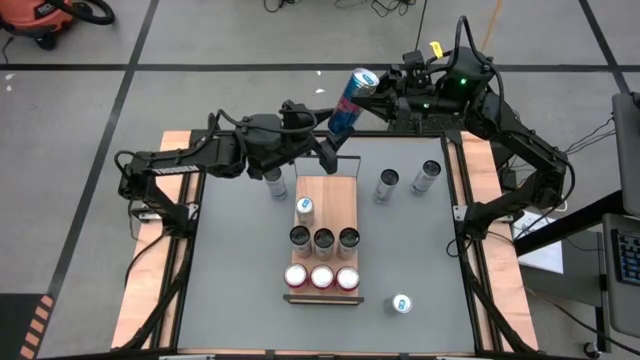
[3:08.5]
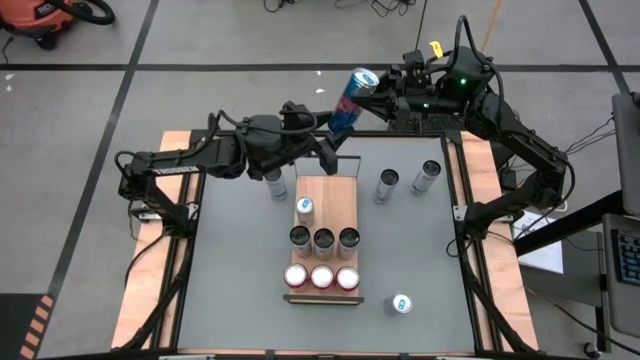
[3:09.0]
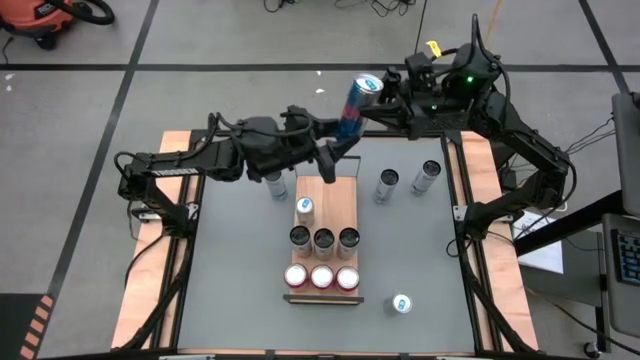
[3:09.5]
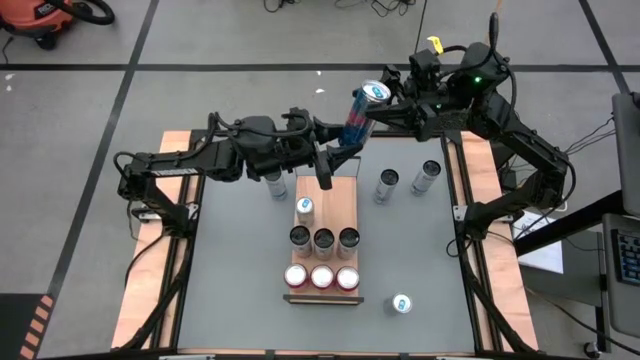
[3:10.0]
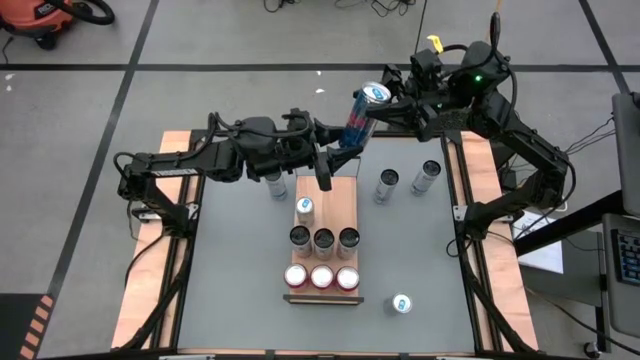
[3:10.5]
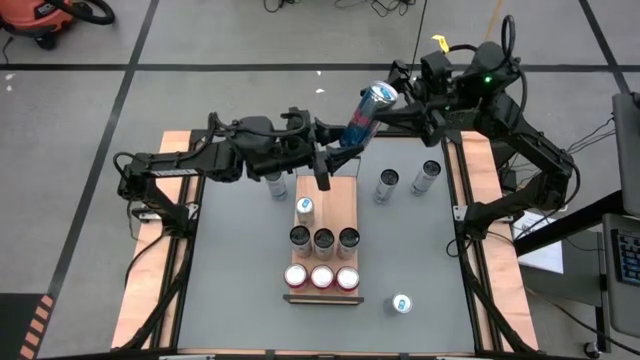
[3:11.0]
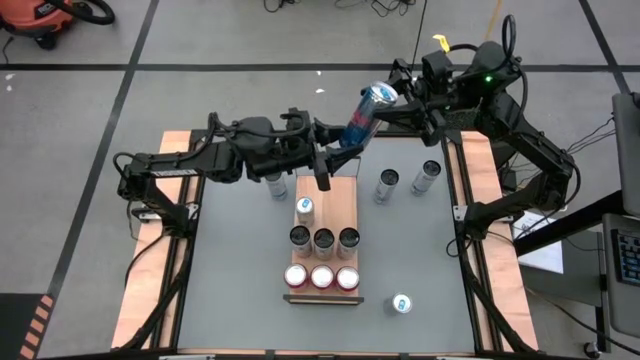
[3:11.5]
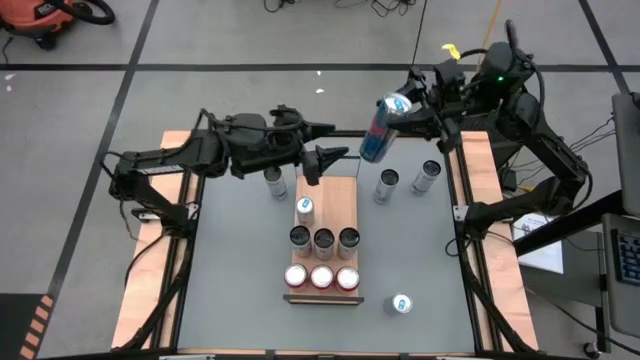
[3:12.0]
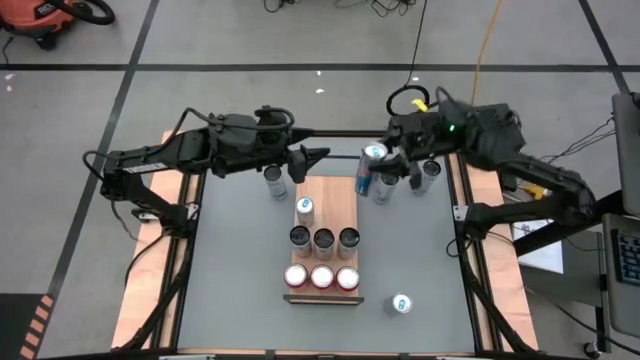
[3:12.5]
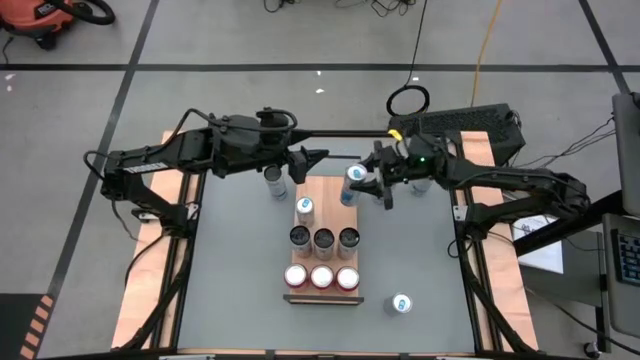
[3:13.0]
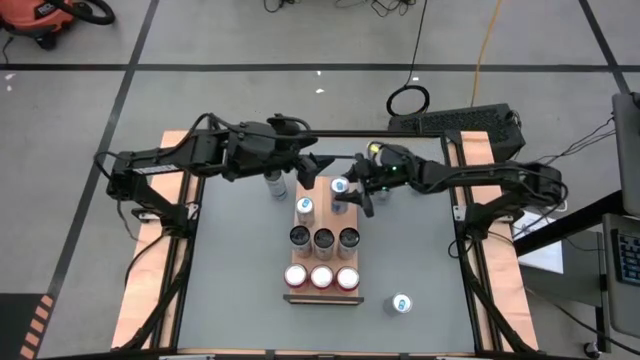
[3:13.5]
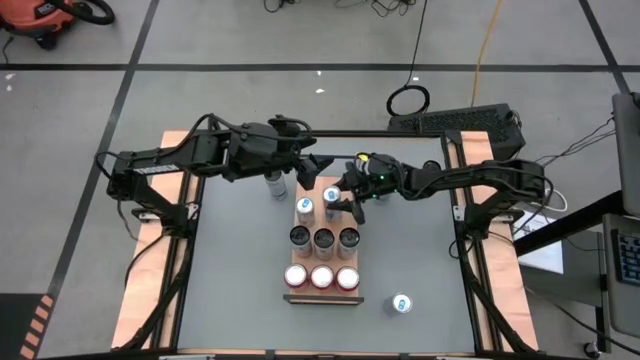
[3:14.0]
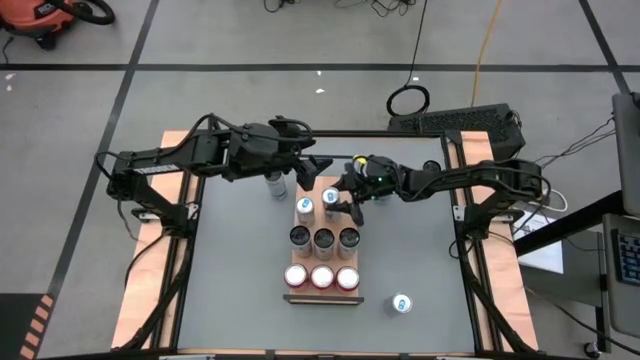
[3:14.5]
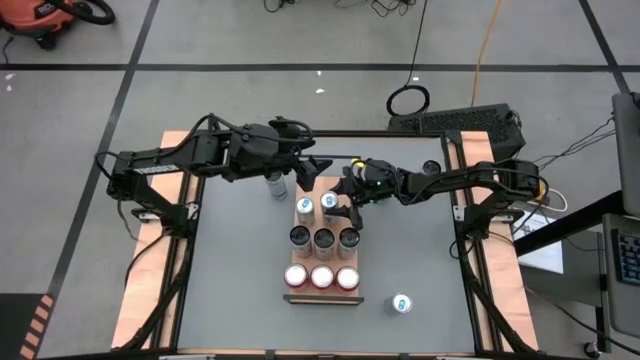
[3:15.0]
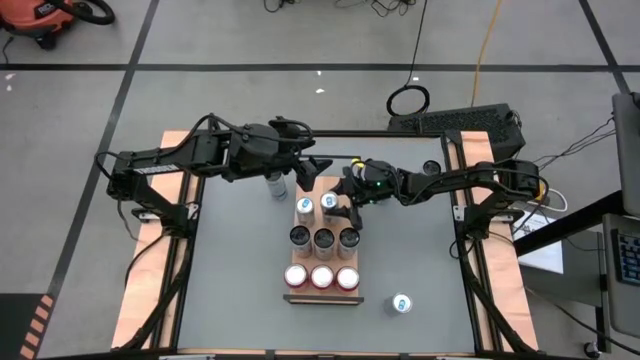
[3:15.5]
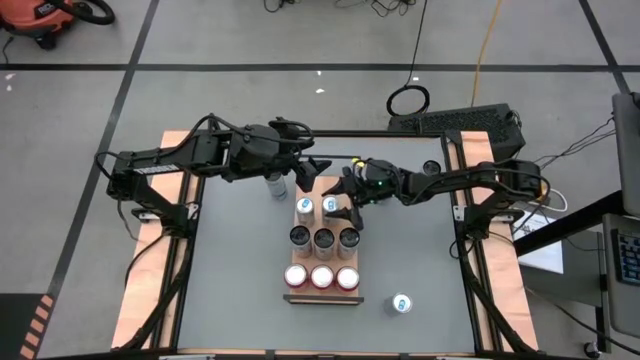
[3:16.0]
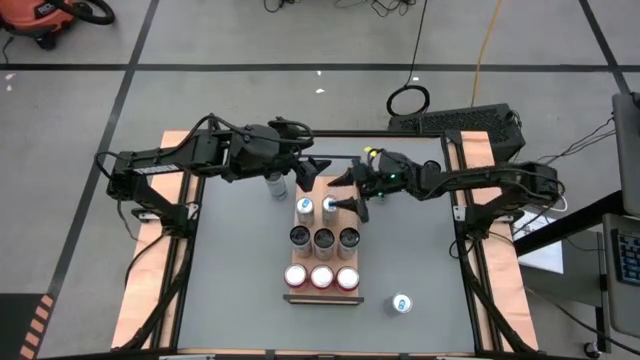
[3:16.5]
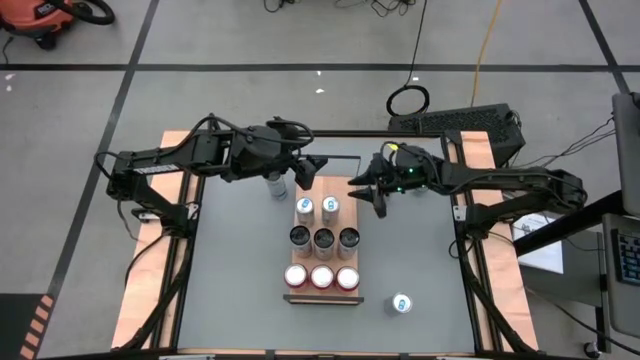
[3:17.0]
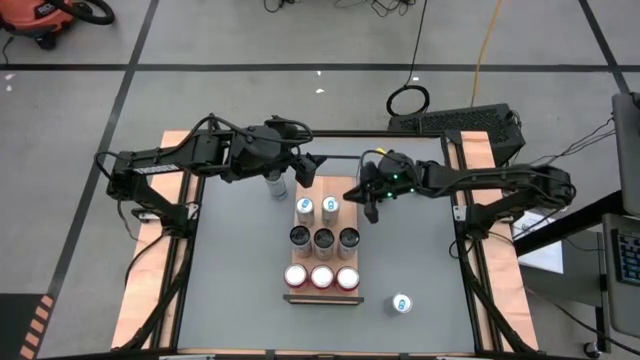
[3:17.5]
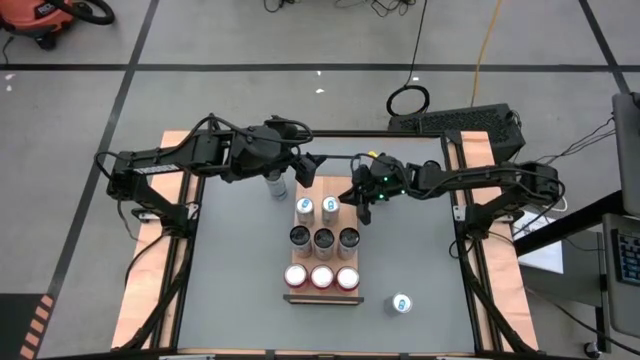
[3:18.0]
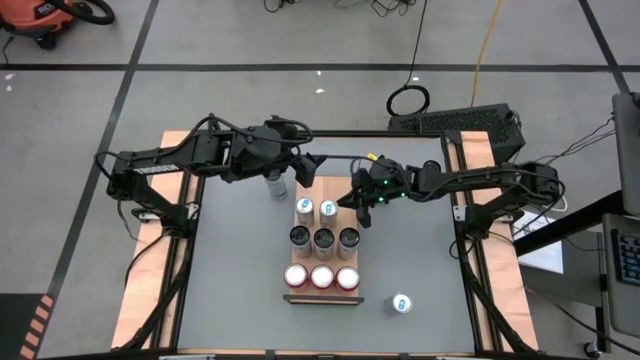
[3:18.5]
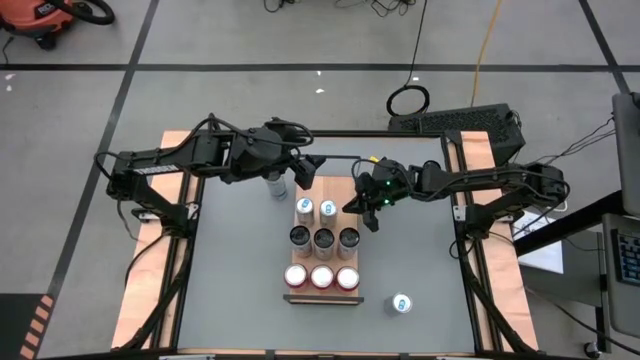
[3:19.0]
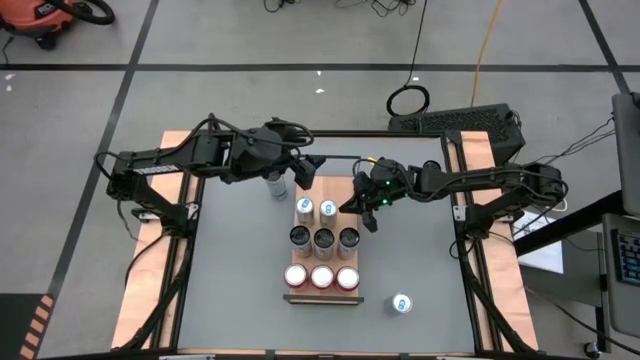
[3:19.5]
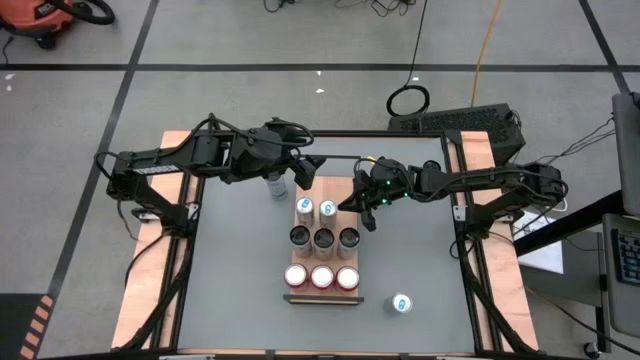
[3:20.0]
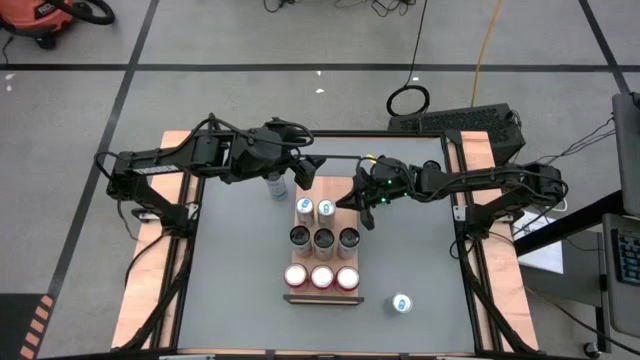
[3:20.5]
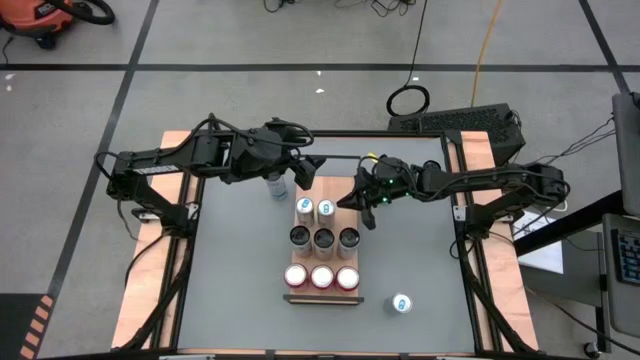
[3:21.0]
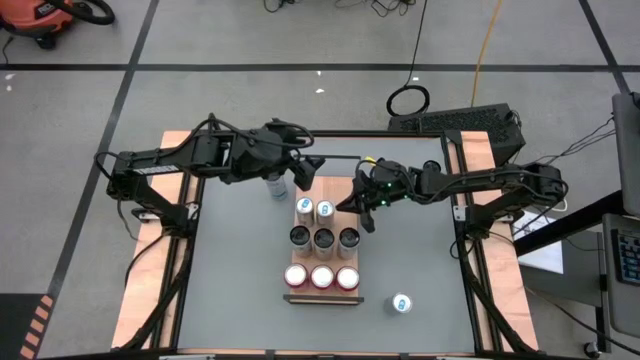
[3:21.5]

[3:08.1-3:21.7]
Task: Sort soda cans
Put the top blue soda can on the shelf and align it with the other blue soda can
